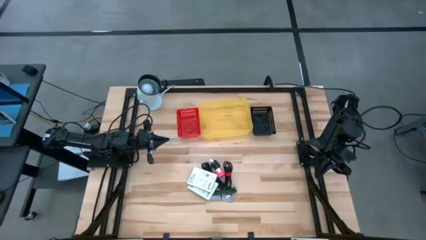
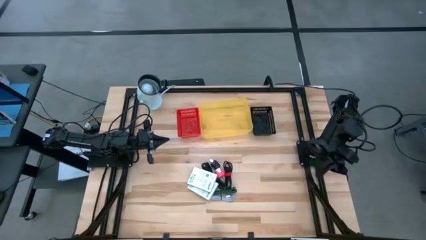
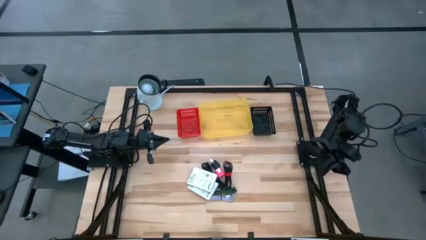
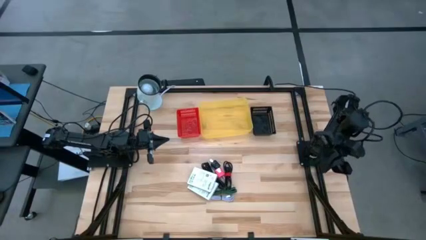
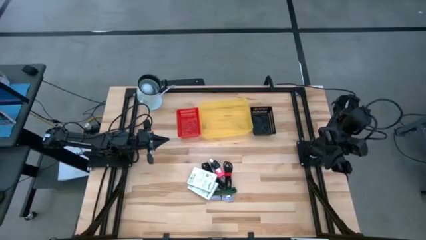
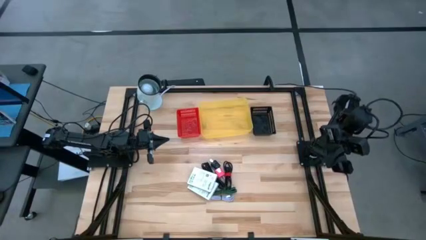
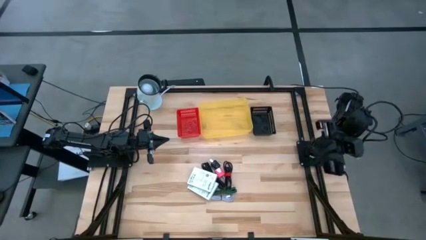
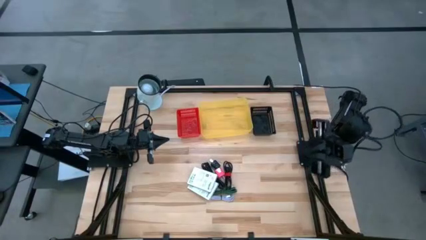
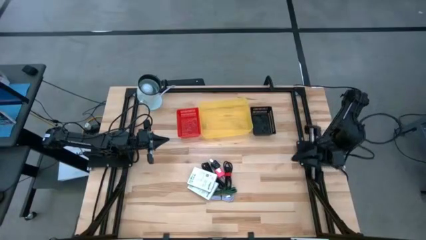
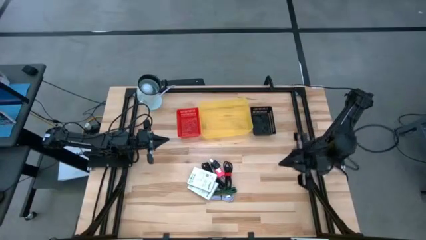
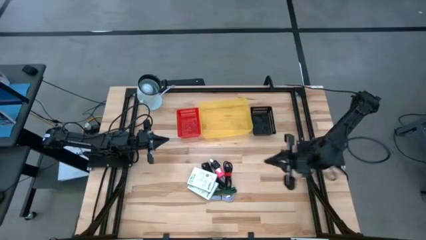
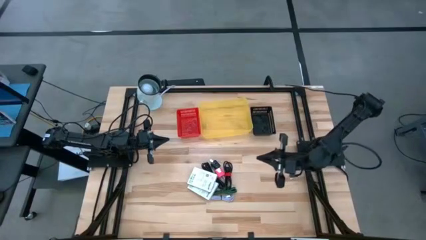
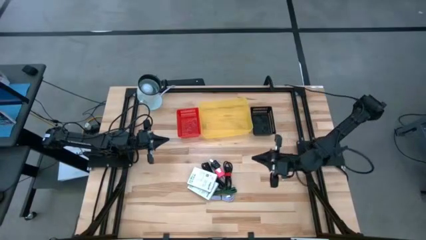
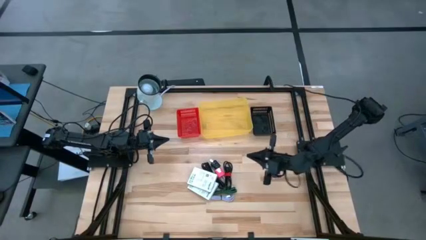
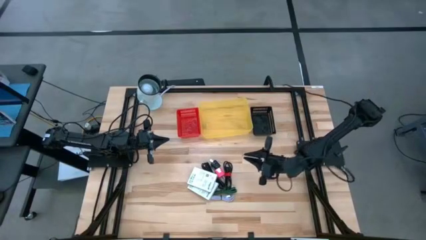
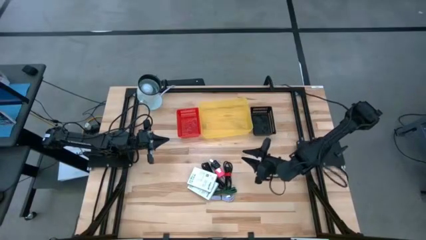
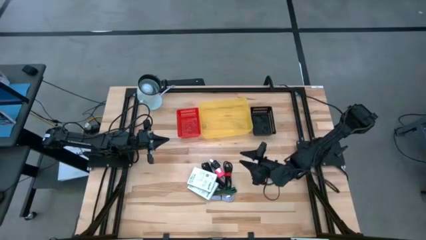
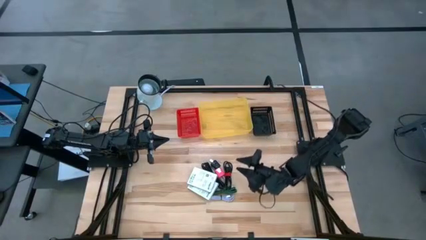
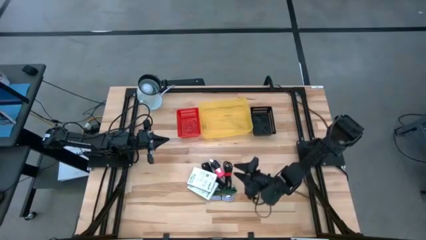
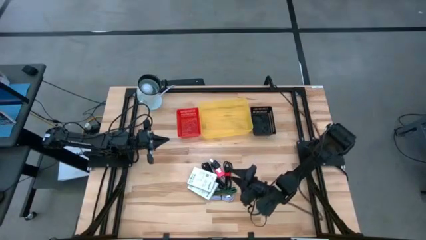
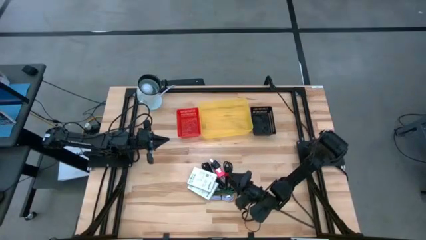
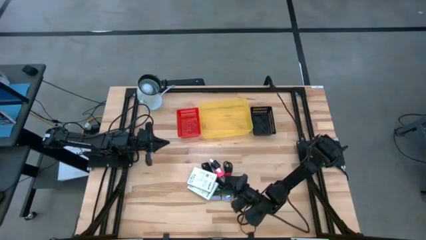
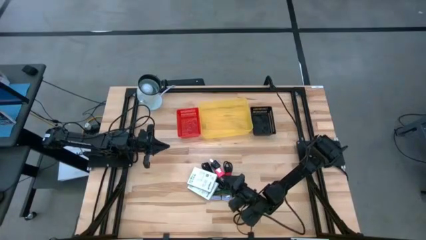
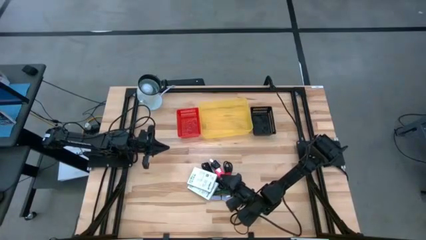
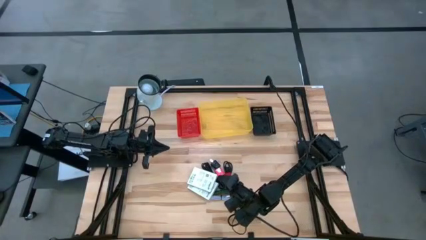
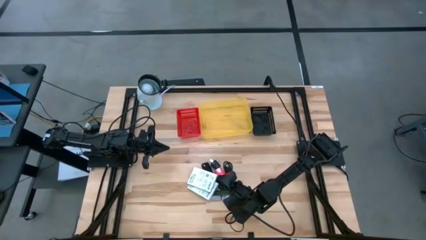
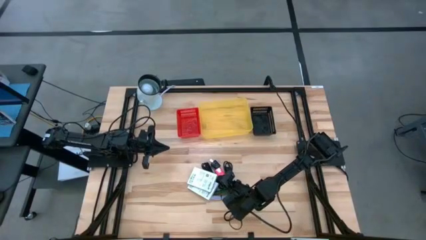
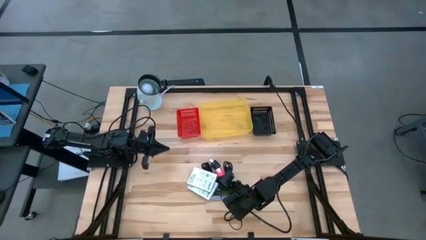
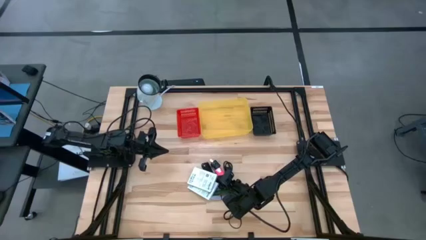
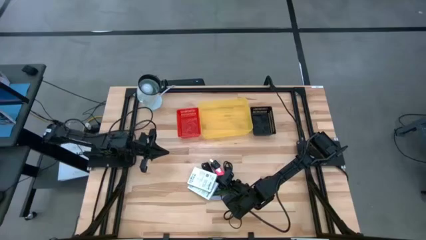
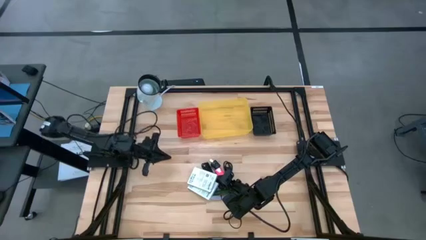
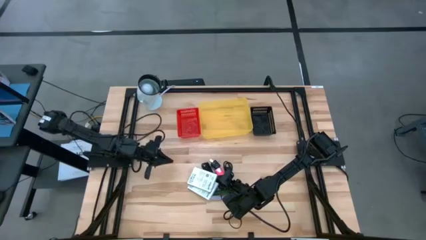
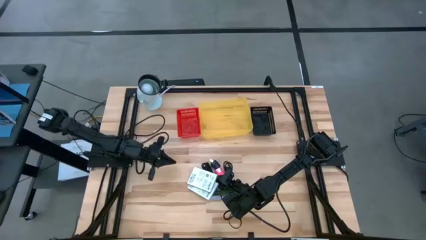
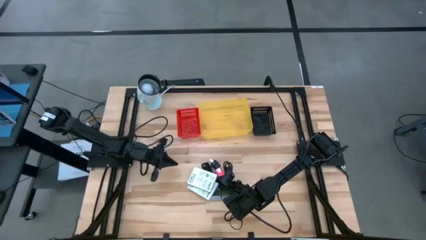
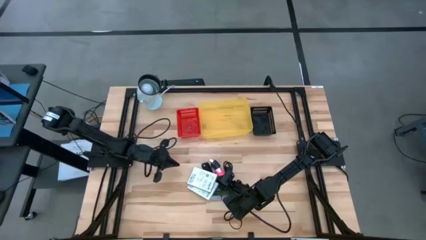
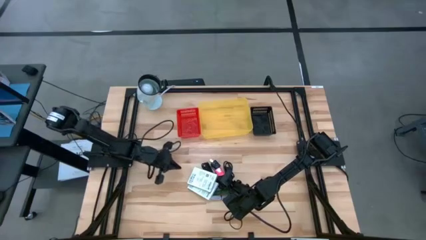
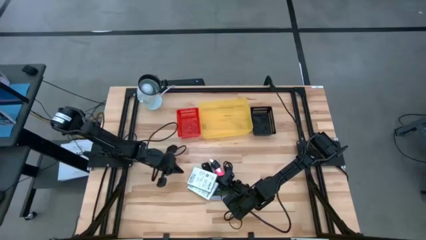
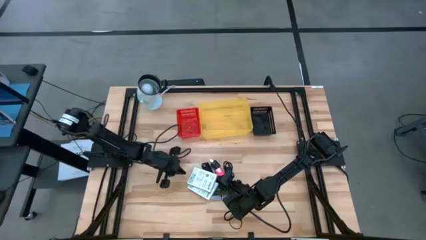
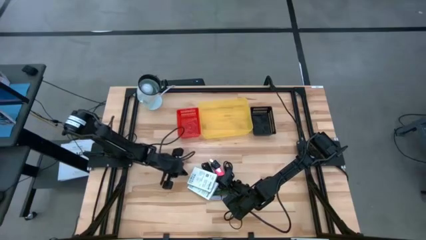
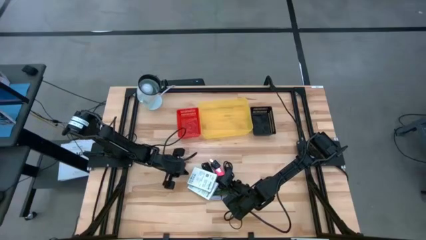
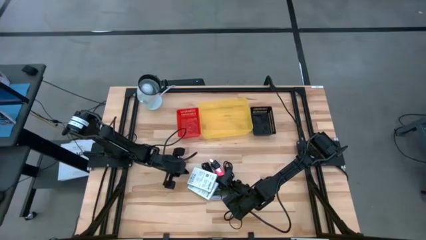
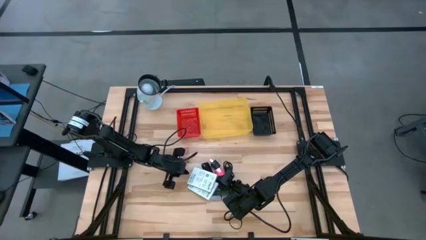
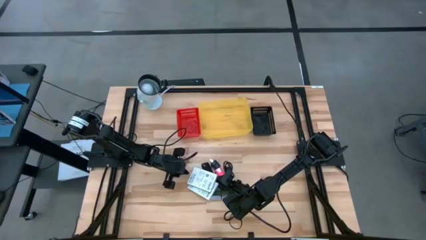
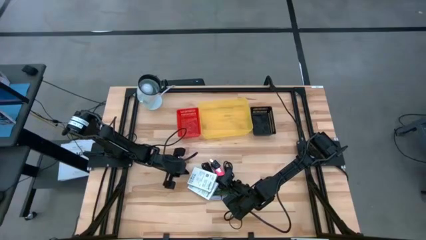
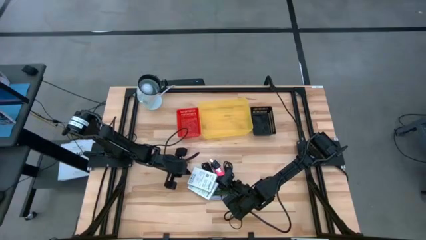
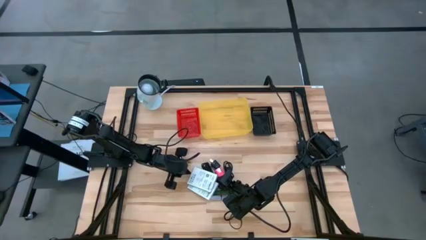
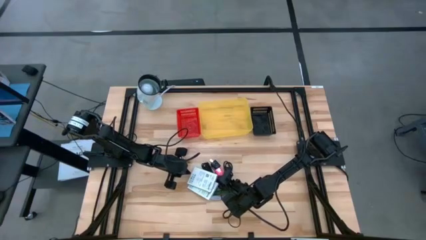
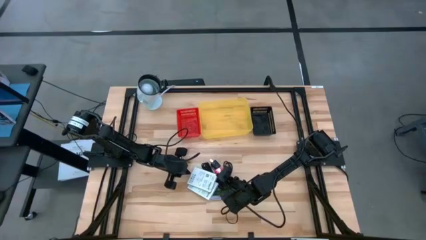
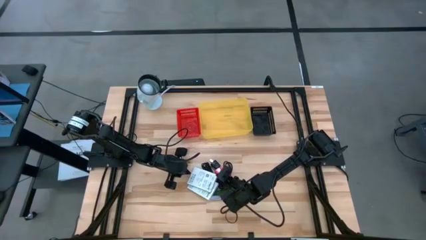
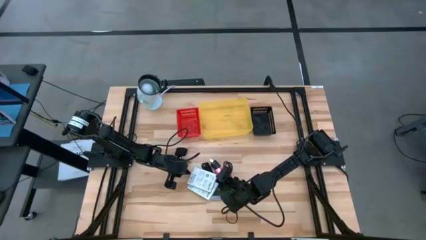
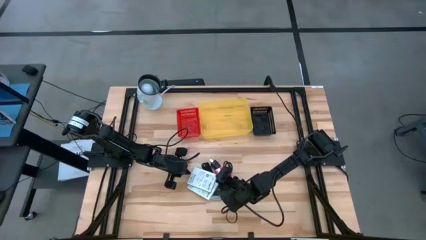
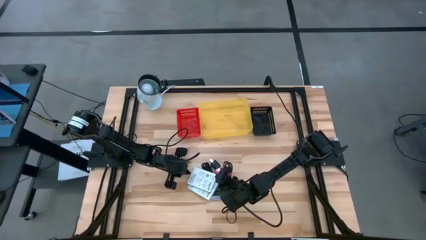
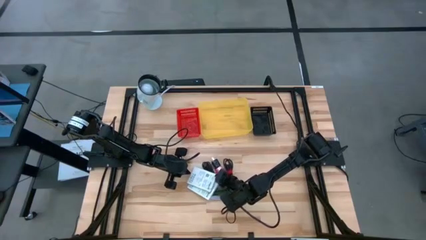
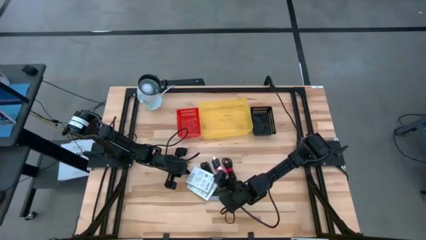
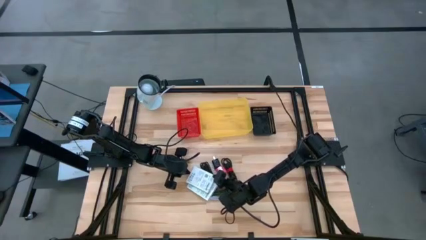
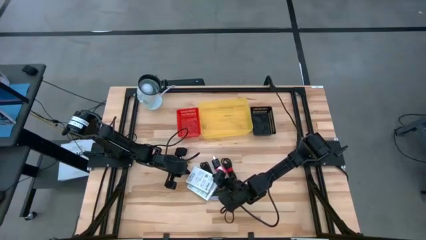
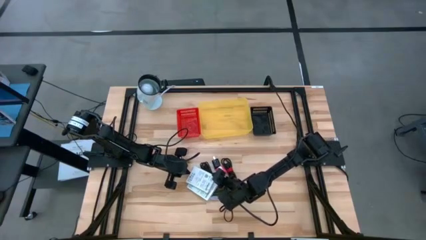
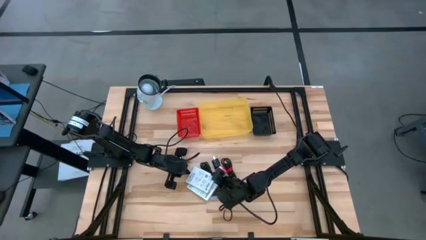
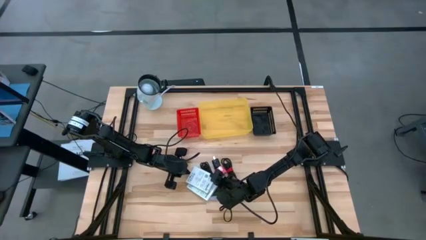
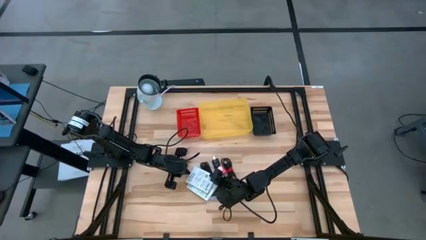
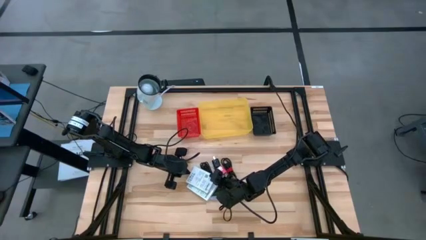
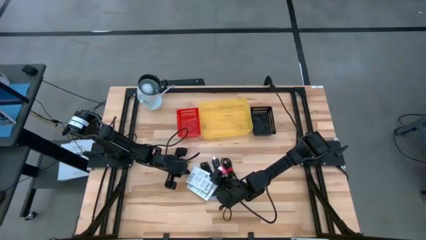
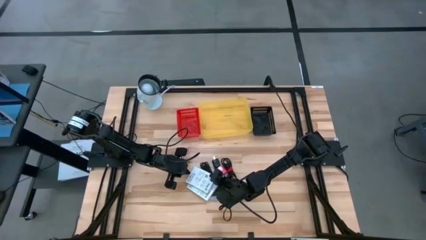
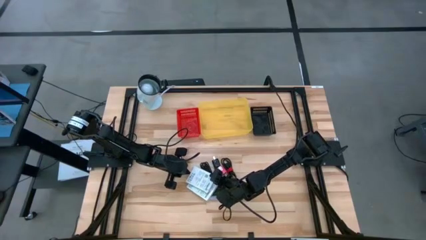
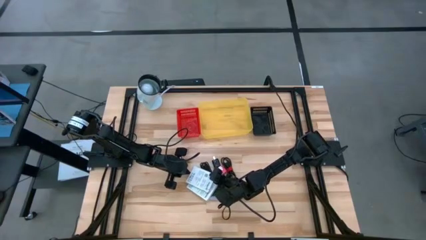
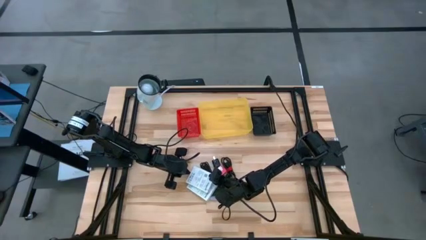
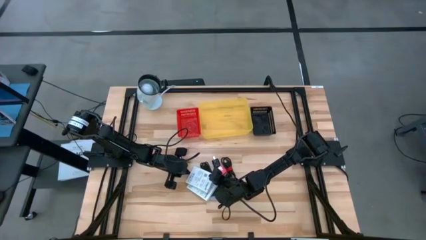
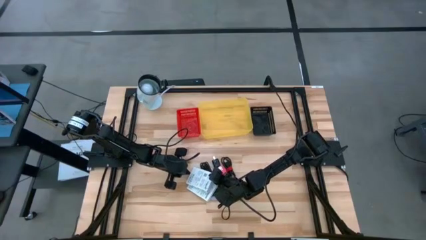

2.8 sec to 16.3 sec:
Task: Pick and place items into bin
Put the top white card reader box into the red bin
